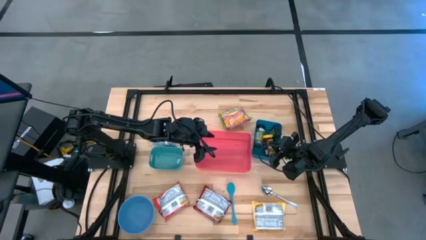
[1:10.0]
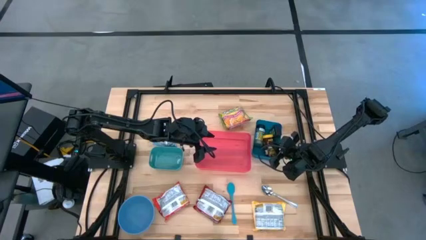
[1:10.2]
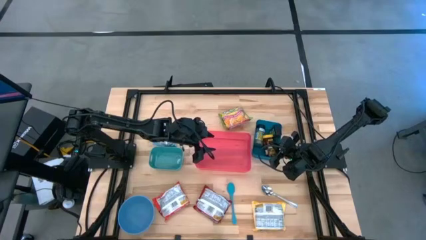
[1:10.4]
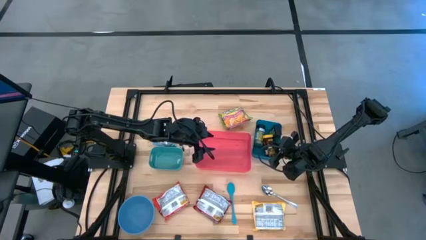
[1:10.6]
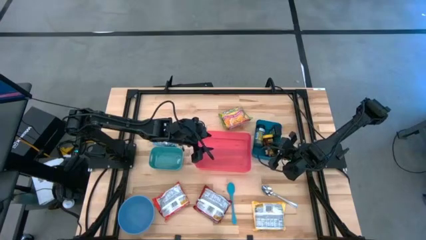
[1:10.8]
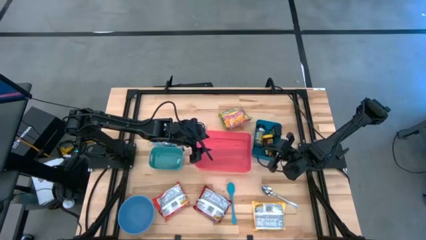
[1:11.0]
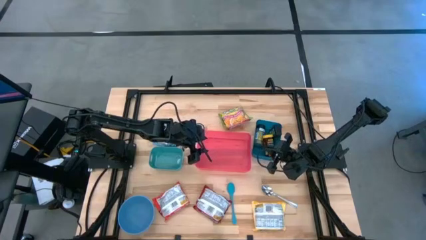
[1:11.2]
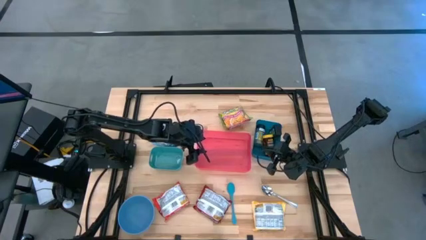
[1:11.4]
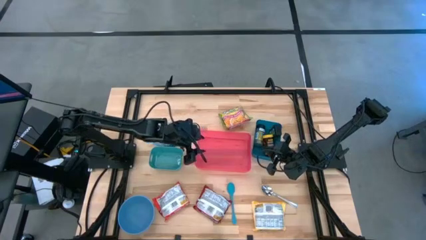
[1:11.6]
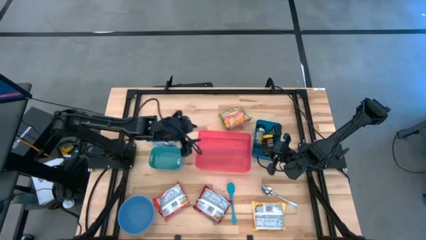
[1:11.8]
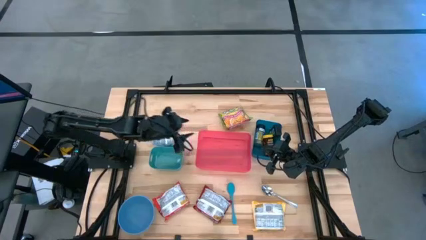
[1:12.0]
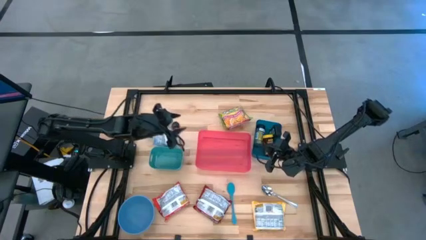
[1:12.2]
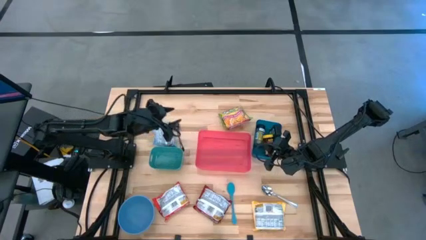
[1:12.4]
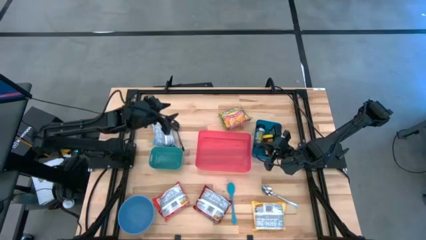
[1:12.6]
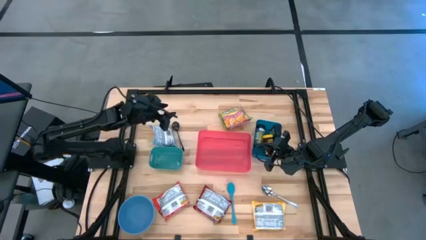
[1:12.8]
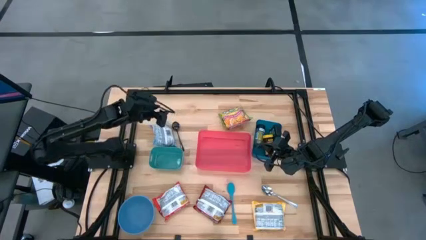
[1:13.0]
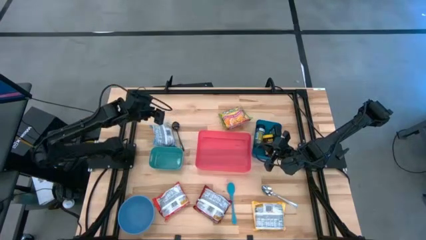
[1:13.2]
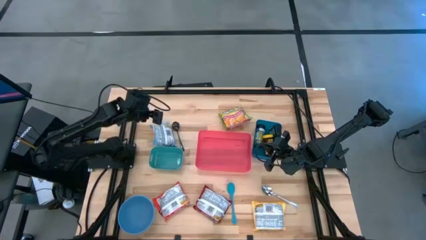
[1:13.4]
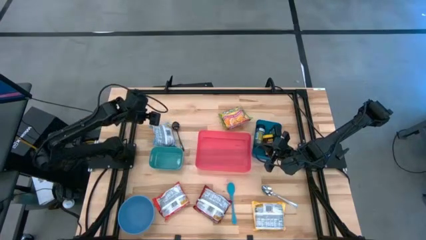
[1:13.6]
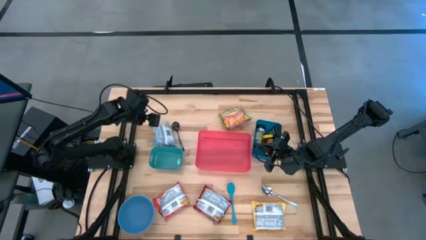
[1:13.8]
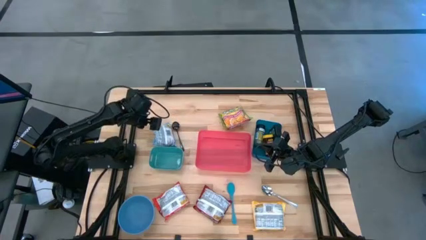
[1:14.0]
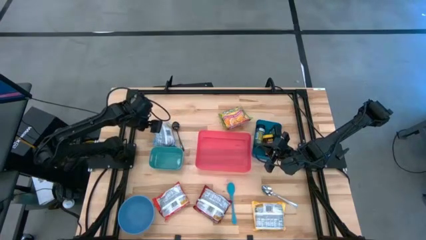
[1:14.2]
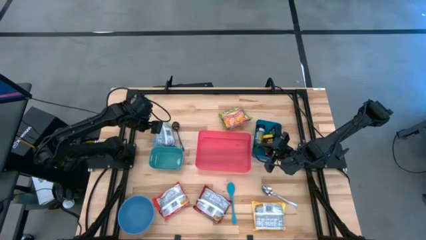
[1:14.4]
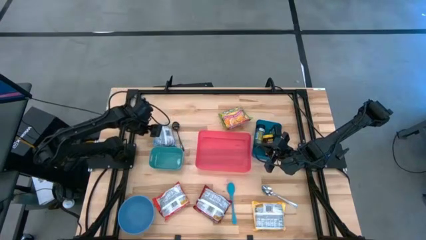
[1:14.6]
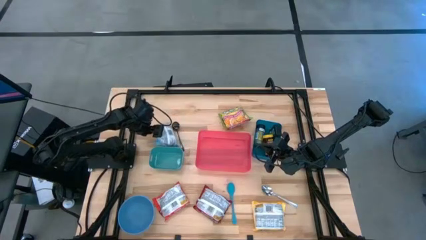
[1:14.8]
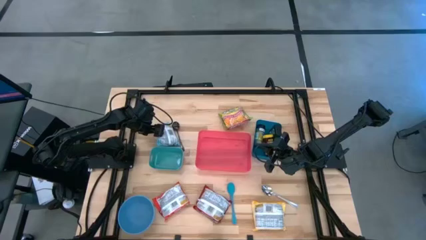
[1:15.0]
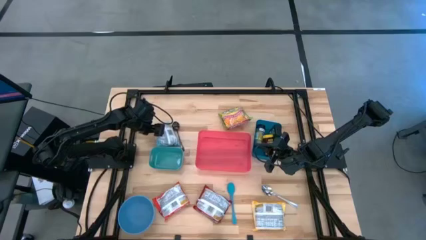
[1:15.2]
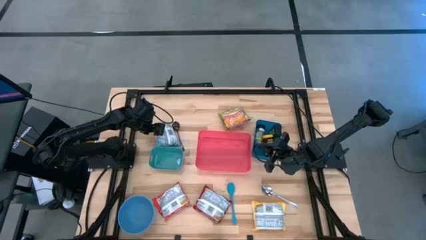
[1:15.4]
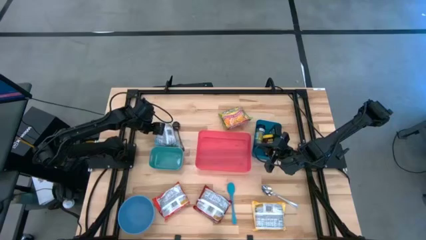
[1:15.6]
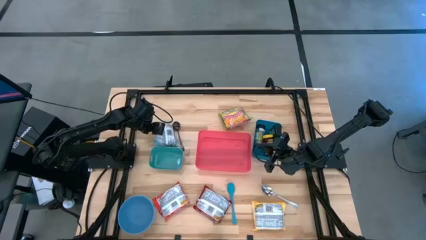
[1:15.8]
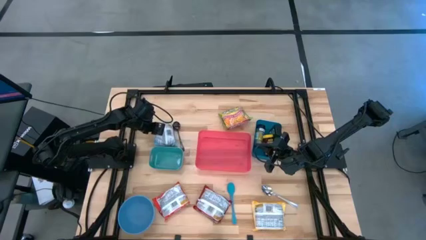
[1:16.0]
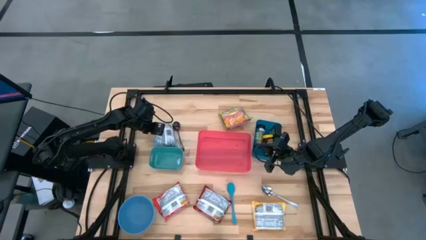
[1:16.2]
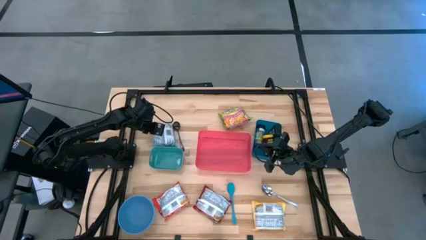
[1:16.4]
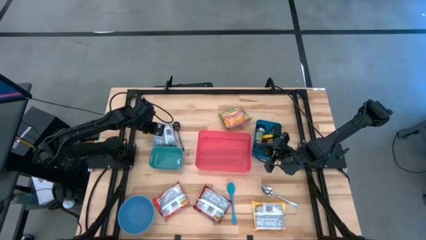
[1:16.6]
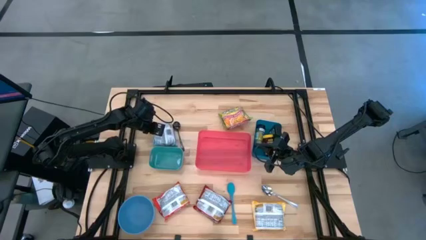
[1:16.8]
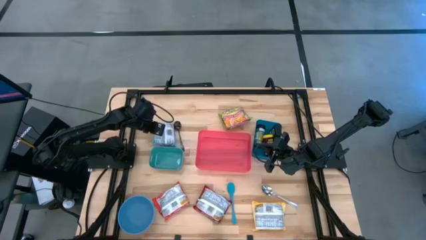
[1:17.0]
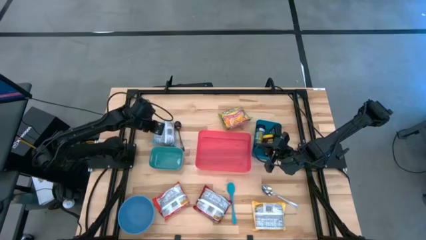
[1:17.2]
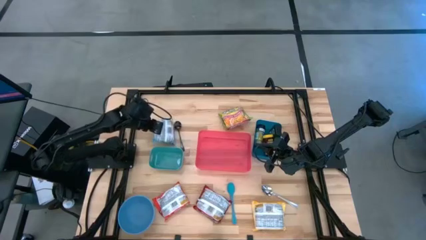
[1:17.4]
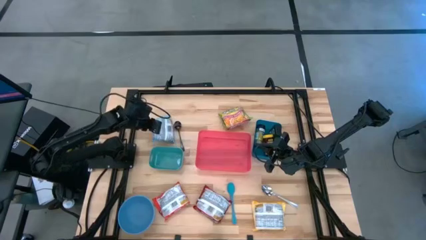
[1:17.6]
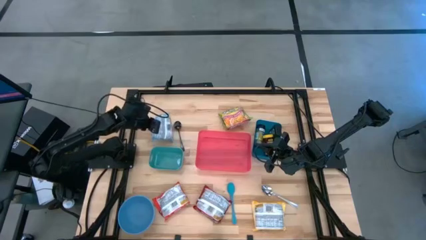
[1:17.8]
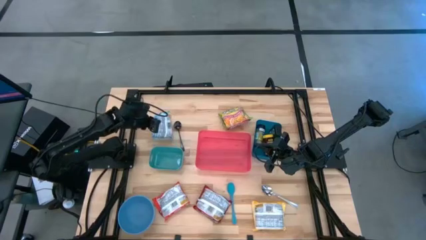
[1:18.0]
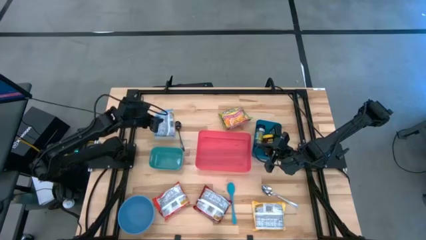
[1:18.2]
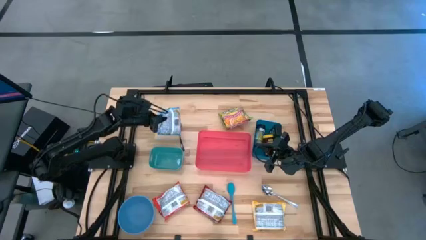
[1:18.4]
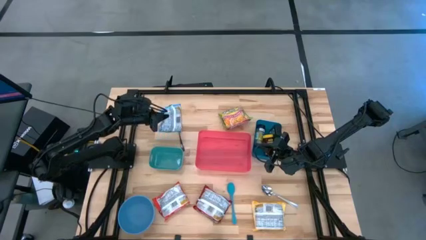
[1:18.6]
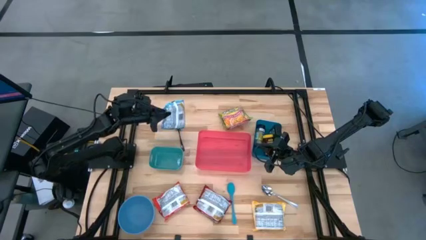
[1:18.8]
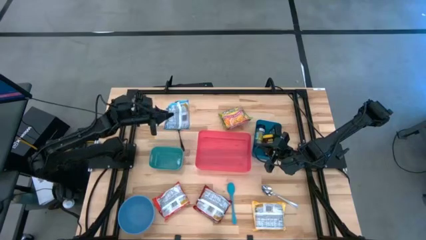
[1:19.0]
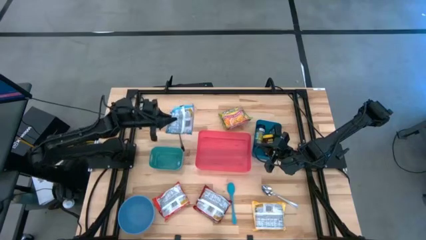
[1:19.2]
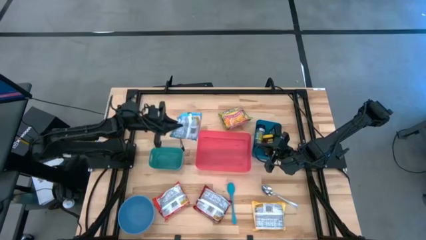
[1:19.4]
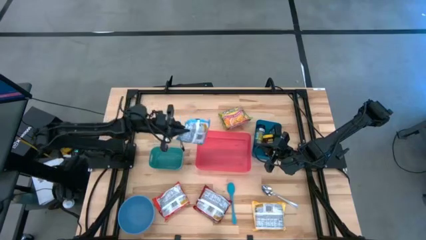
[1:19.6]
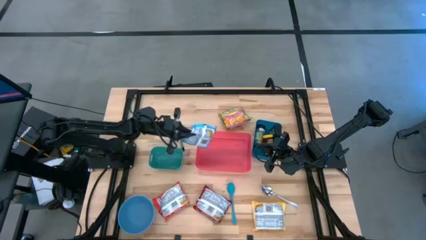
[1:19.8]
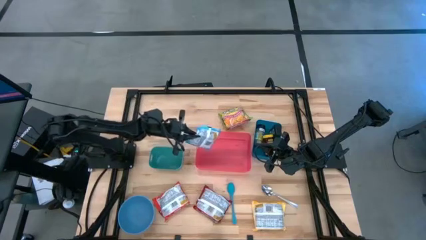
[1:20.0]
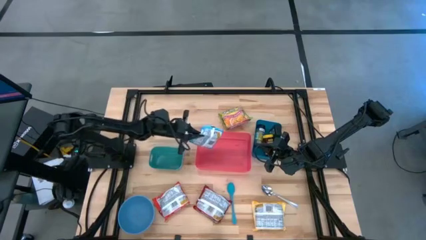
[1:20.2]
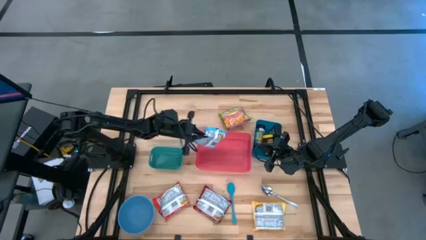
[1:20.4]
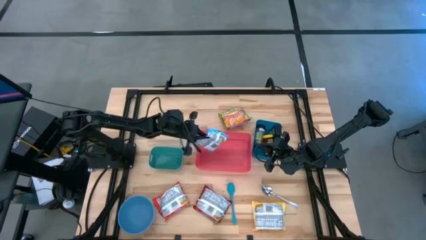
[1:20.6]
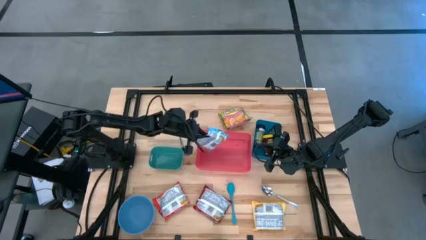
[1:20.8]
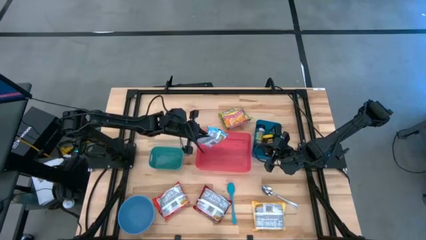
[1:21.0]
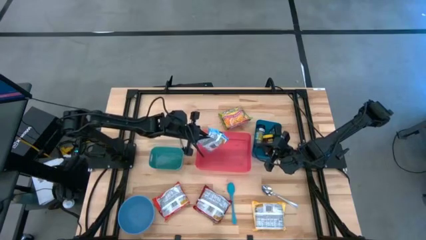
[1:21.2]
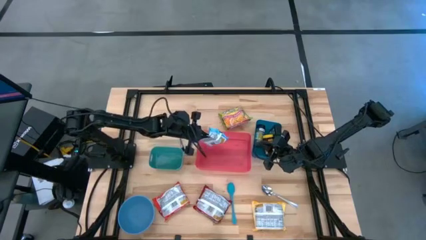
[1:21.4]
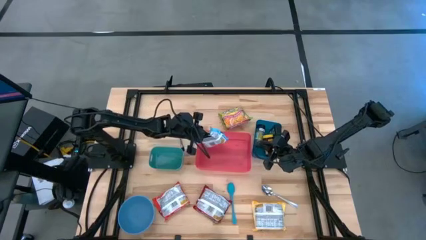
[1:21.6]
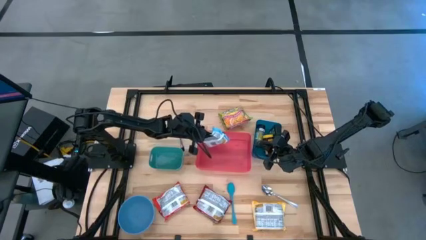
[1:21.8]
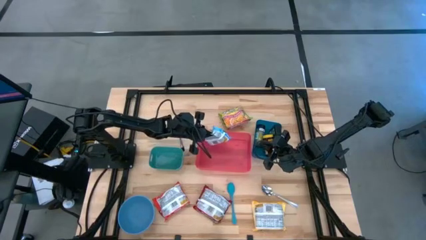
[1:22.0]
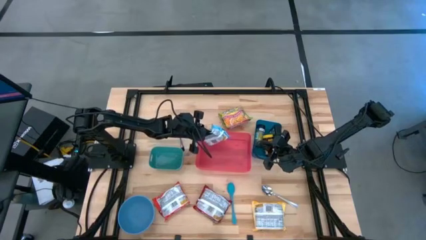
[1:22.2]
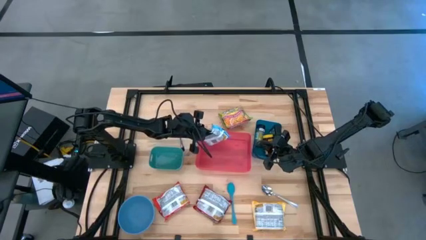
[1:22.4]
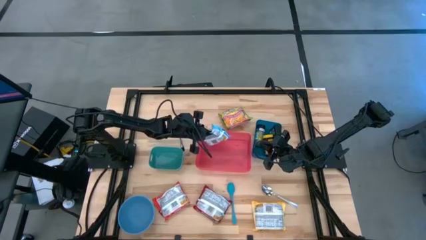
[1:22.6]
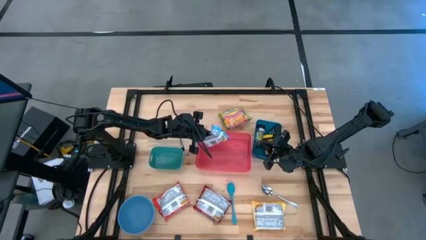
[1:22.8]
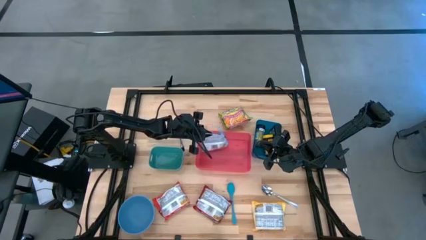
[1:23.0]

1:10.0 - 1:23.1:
Task: Pick & Place Food Item
Put the blue noodle pack into the red bin

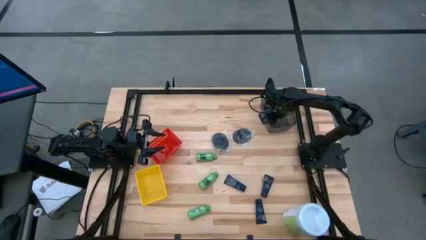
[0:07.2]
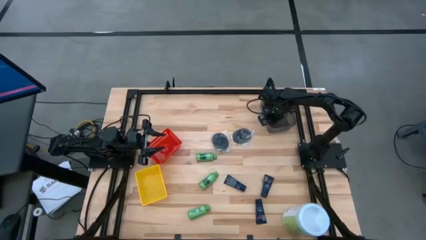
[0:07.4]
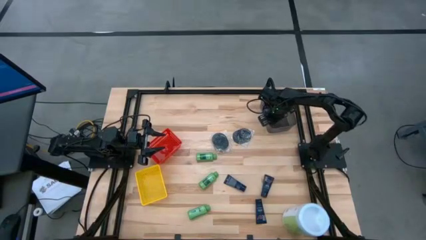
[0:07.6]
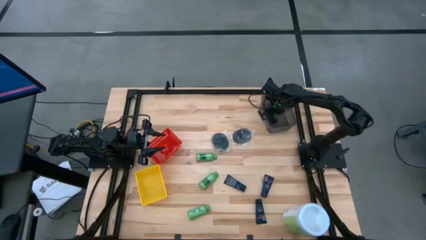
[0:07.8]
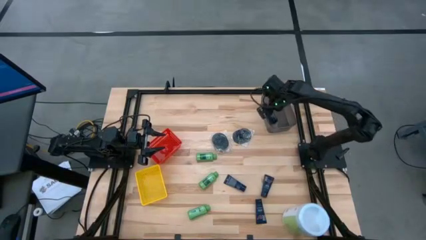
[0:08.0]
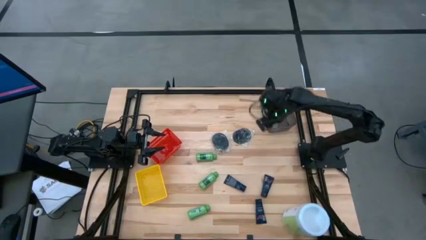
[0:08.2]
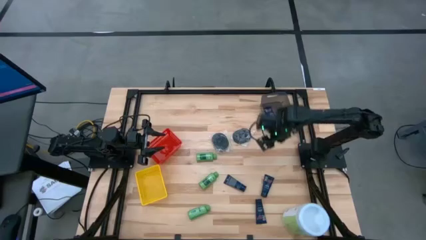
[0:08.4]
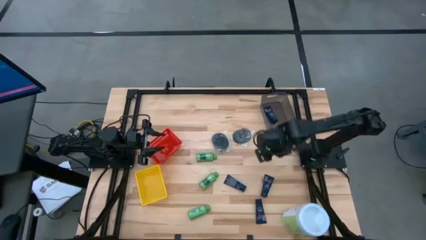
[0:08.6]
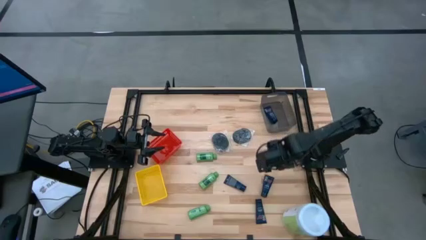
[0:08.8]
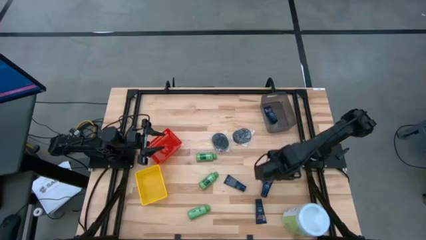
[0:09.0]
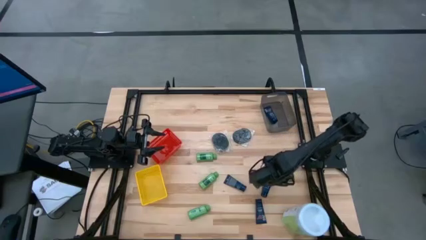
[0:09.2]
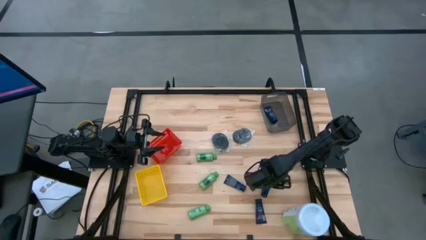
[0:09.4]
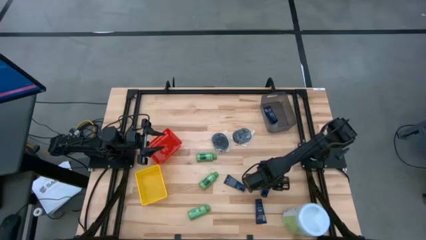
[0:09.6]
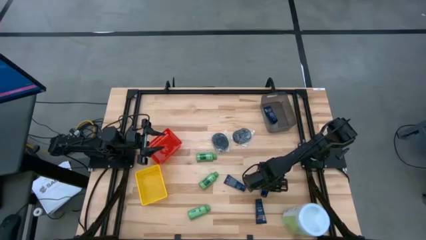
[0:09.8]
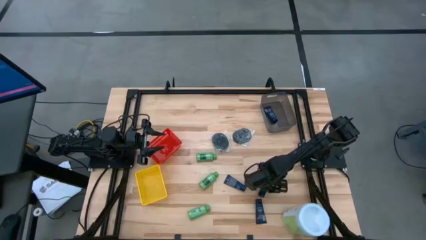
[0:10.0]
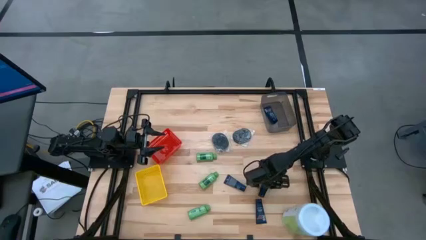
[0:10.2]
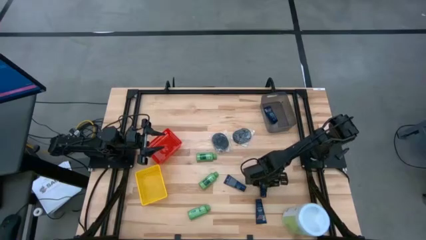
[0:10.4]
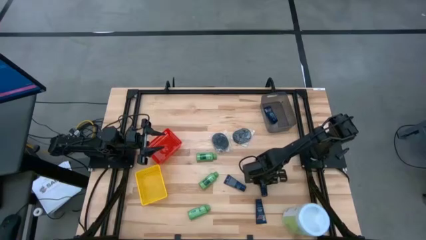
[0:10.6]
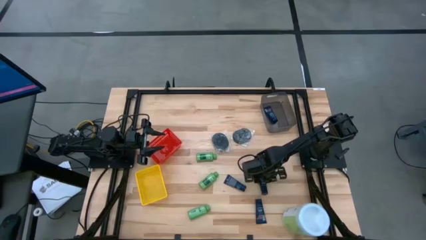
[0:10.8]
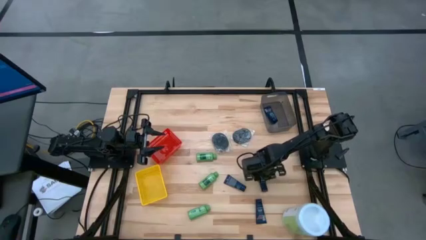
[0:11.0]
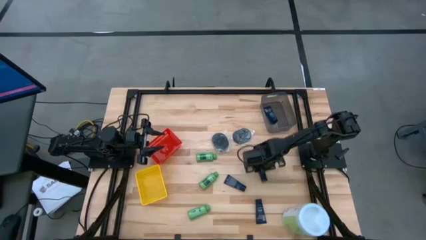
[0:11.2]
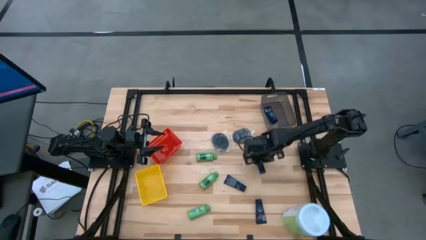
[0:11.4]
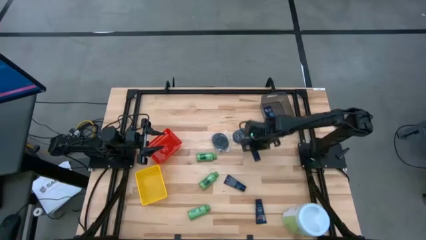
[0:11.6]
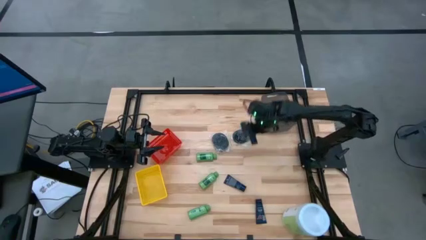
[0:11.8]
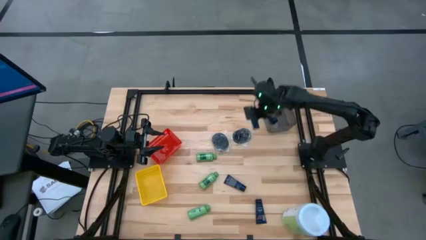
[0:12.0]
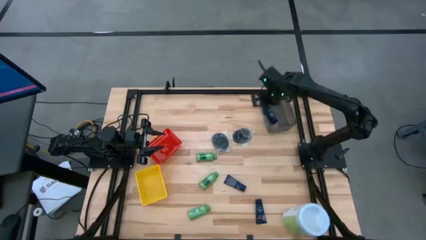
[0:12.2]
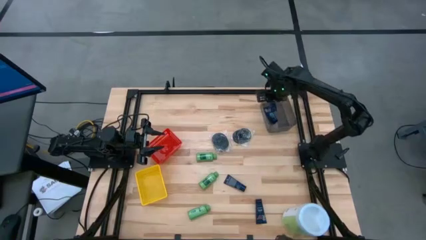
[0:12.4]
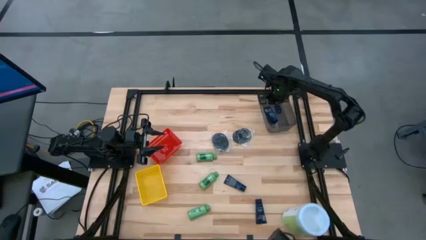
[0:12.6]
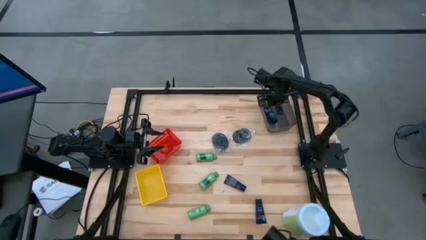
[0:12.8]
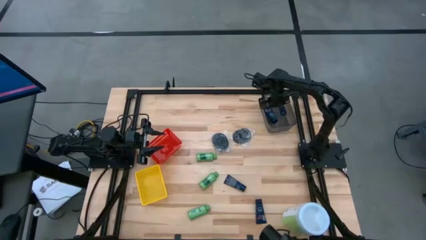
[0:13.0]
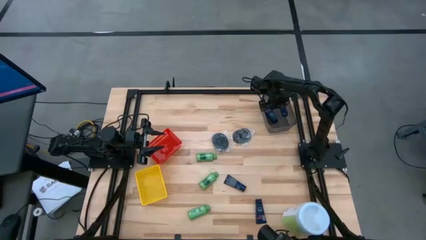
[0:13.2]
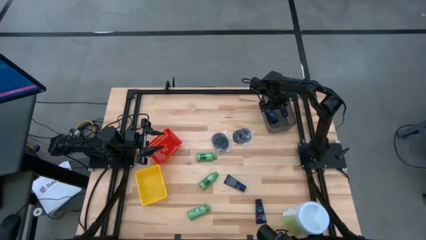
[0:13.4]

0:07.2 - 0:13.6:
Task: Pick & Place Travel size toiletries
Put the shaving cream into the black bin
